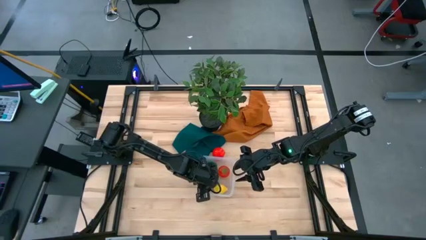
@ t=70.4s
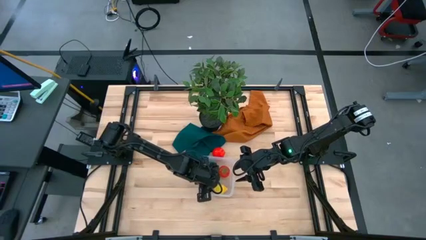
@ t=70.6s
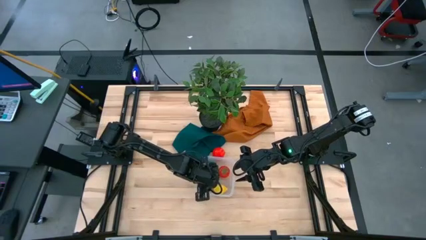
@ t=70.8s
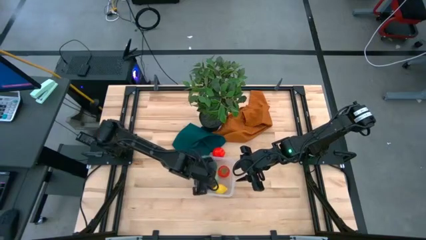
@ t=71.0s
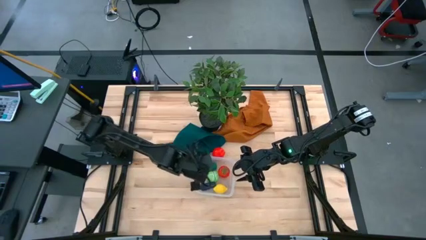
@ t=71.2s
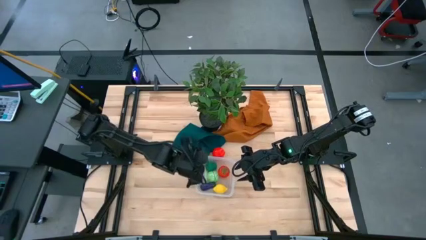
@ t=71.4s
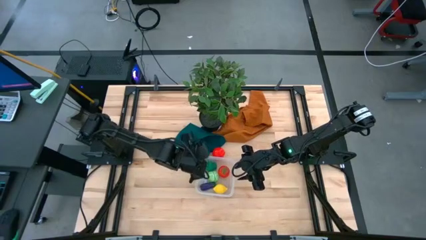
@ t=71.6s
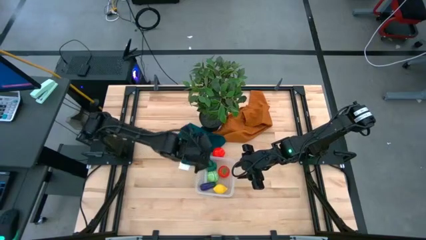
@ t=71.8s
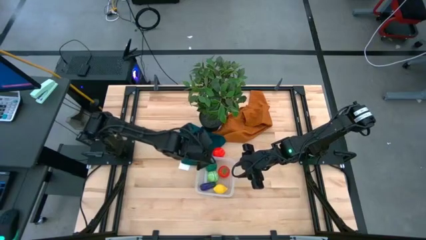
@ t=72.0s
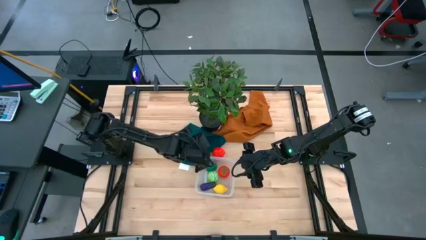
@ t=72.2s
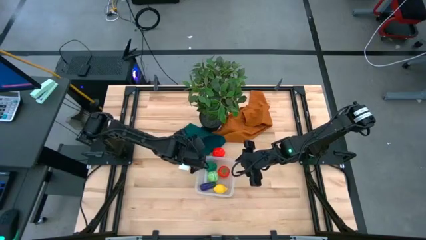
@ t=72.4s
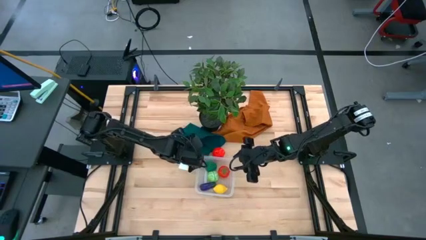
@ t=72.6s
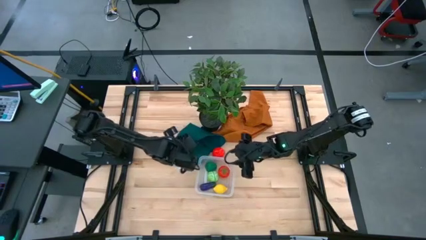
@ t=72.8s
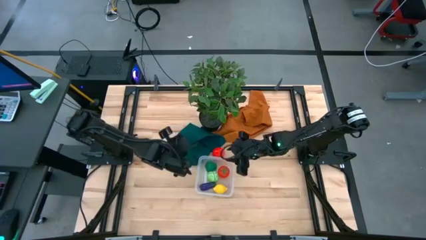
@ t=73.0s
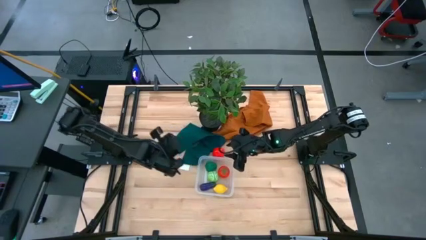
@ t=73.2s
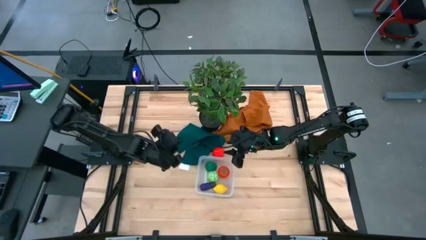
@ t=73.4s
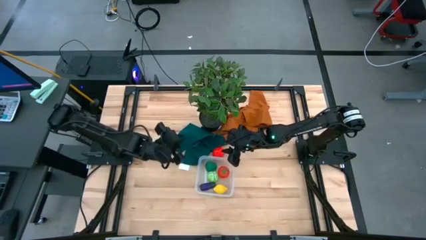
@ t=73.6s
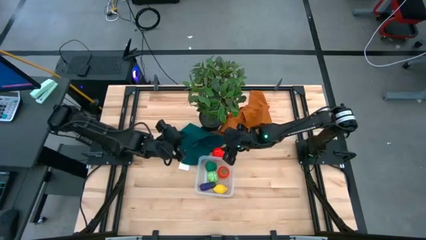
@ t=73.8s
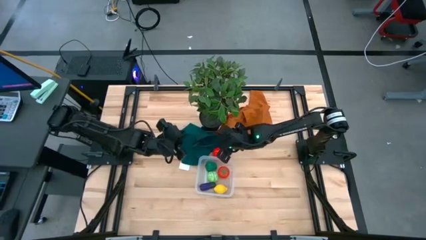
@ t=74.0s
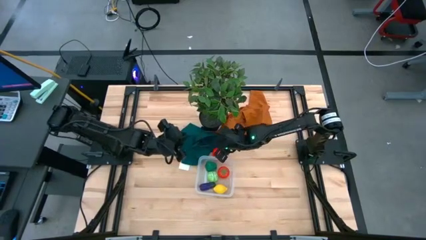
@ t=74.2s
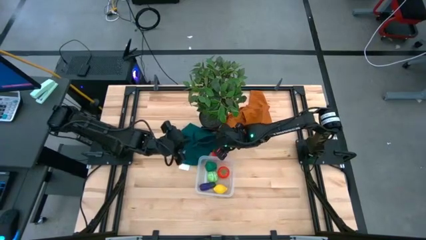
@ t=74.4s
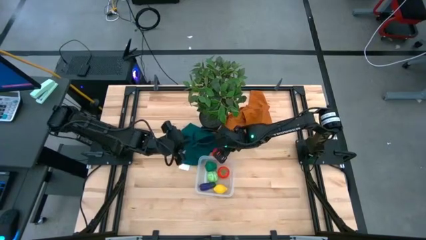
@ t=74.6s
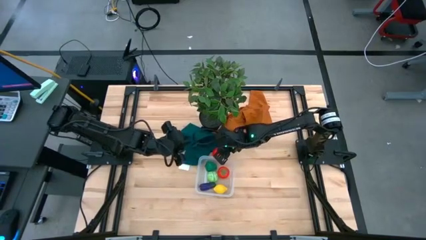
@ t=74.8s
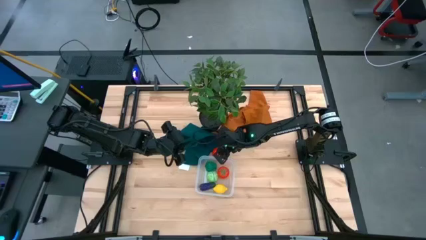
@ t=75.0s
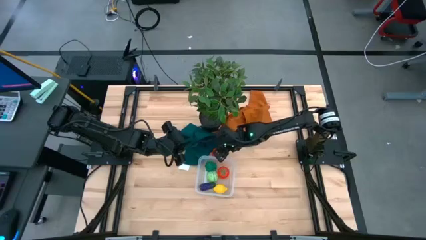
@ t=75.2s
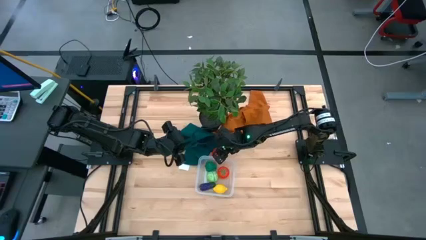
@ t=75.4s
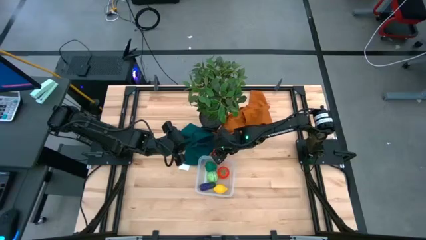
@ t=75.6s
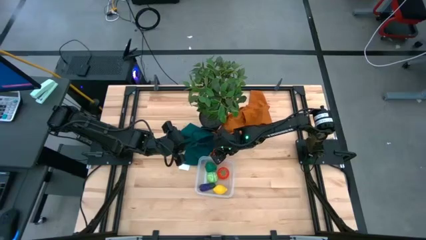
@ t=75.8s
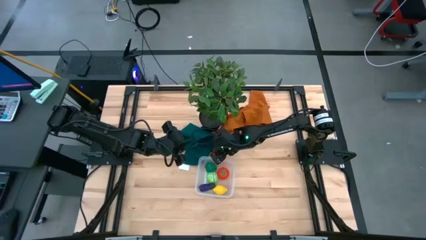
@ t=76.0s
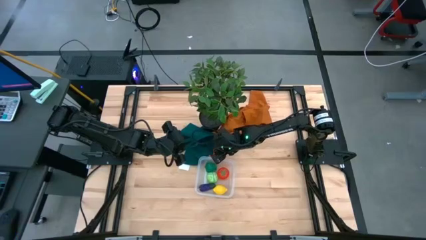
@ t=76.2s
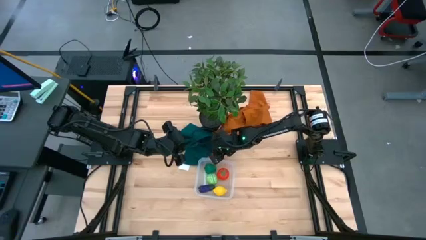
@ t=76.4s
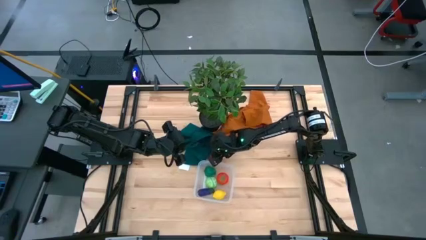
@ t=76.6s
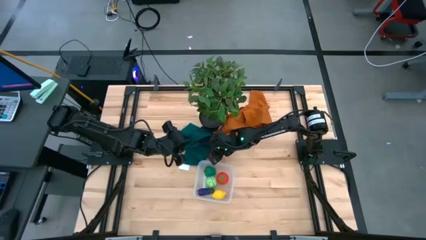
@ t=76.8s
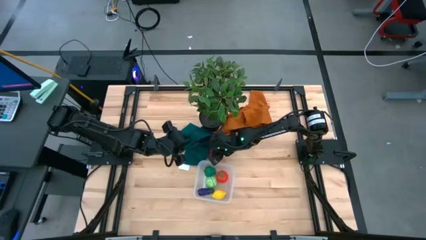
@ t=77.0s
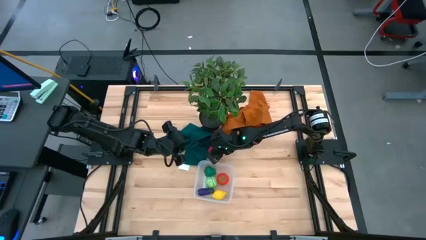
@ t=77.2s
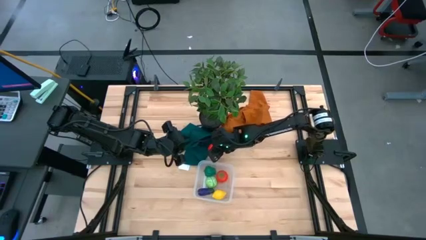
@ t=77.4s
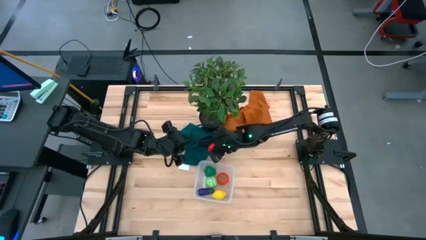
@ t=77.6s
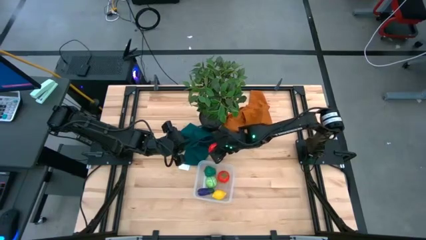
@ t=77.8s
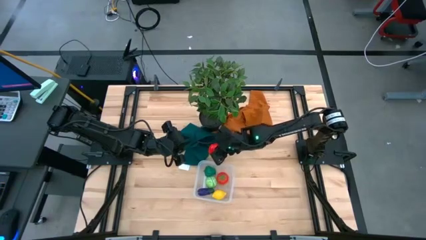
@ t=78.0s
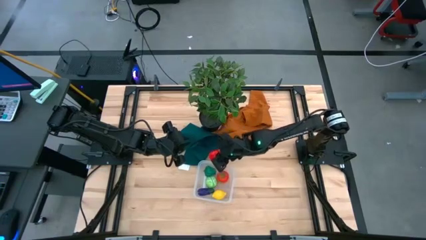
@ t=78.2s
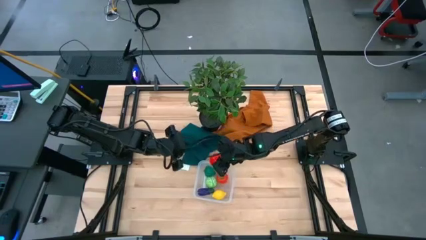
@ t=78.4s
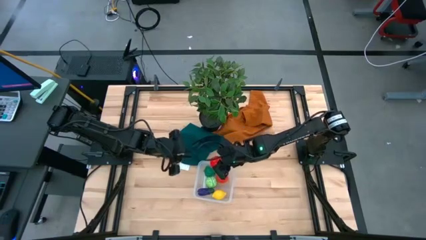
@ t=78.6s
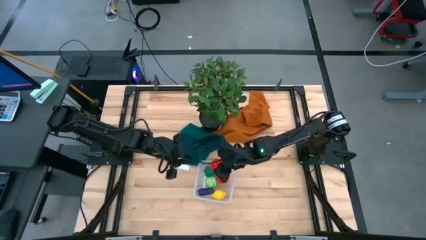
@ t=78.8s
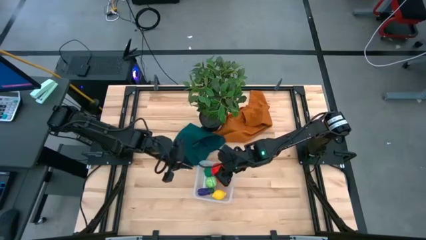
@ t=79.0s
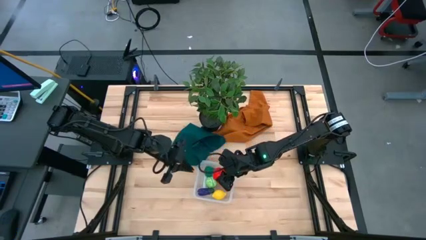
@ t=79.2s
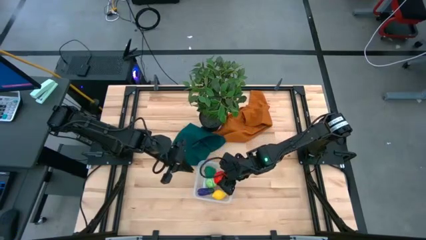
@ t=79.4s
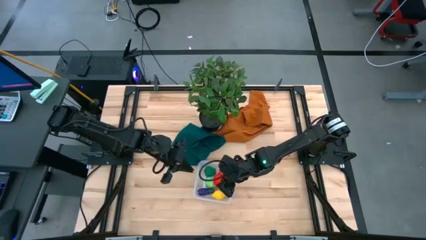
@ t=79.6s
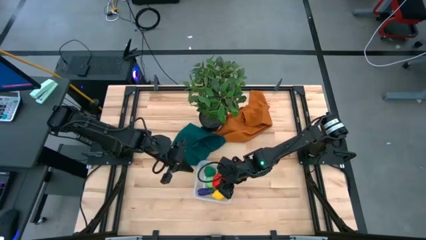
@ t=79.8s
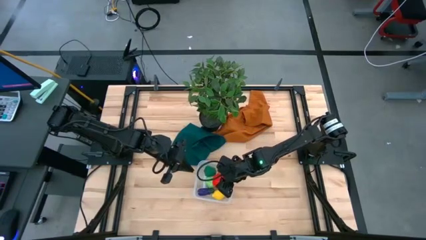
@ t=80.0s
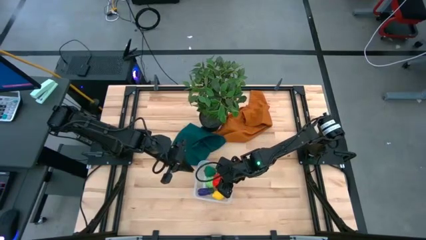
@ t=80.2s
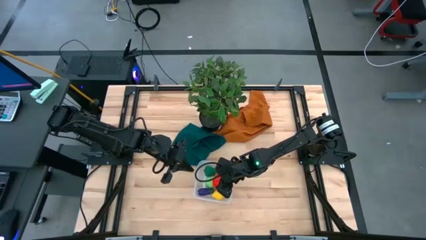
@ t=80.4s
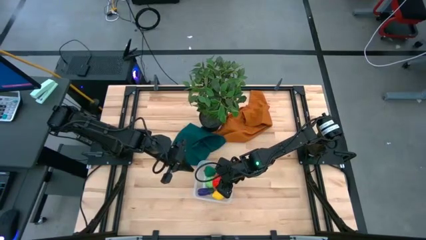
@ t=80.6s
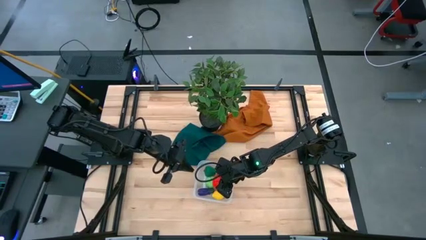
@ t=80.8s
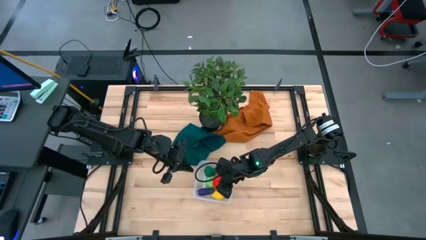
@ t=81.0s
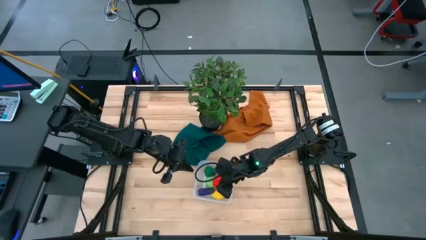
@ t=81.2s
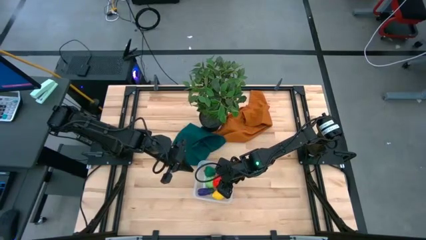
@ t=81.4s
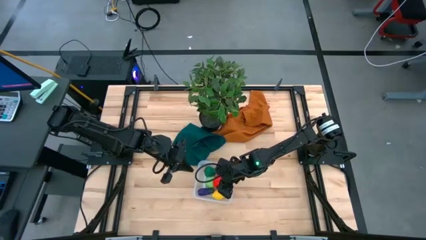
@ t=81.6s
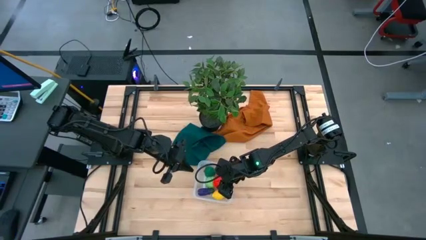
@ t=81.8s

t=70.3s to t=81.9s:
Task: Pick and placing Produce into tupperware
Put the apple into the transparent bin
